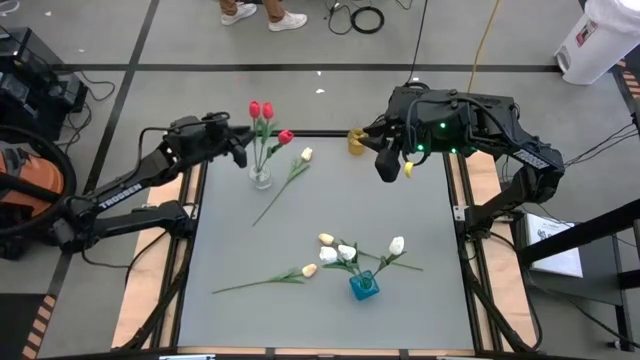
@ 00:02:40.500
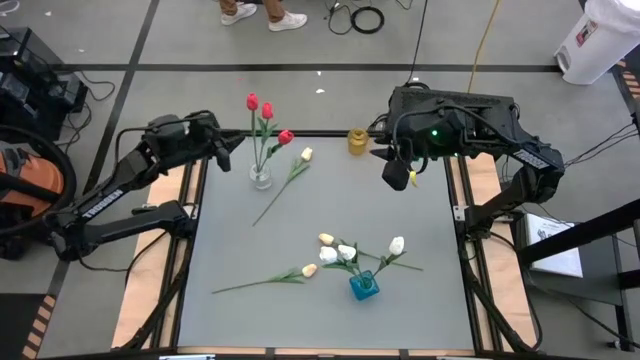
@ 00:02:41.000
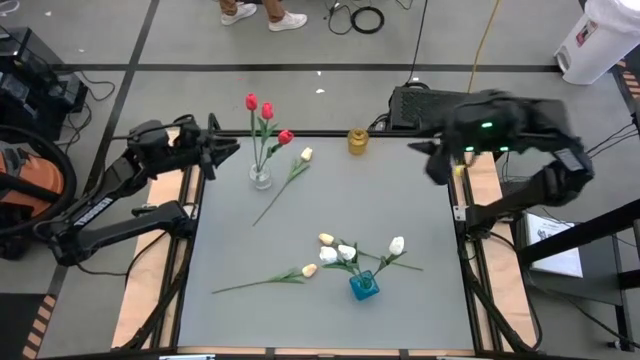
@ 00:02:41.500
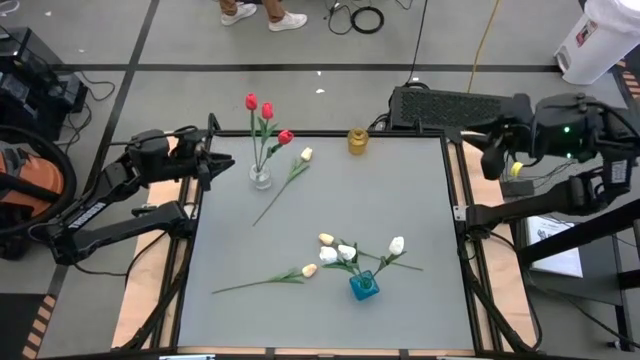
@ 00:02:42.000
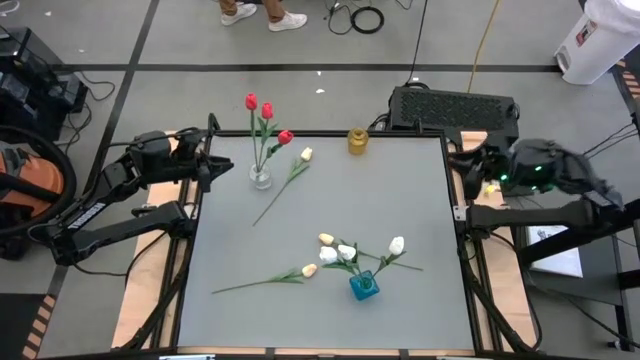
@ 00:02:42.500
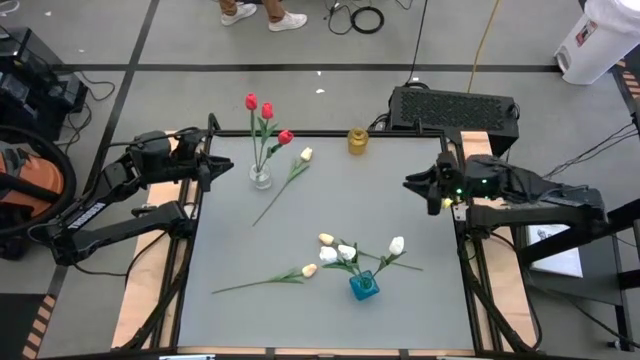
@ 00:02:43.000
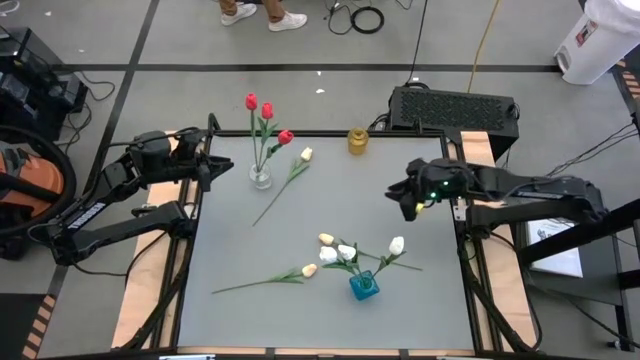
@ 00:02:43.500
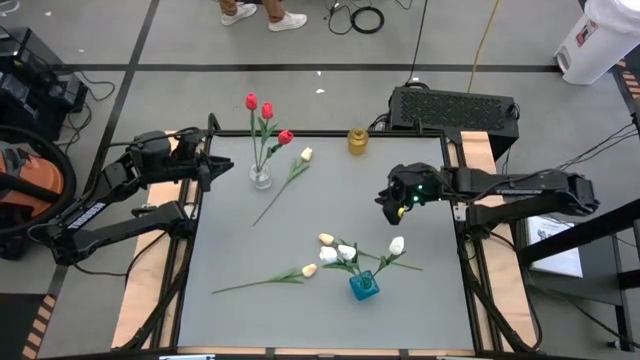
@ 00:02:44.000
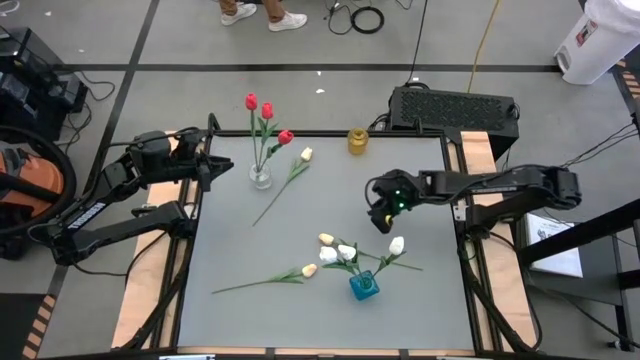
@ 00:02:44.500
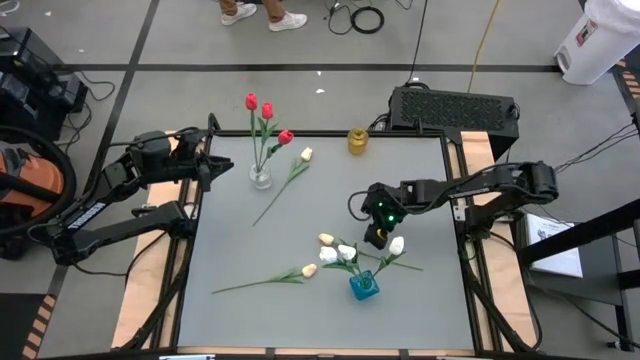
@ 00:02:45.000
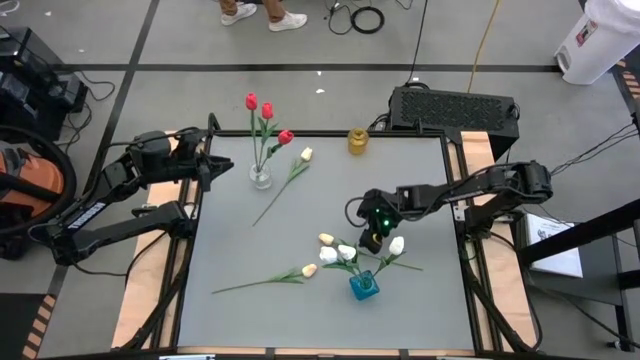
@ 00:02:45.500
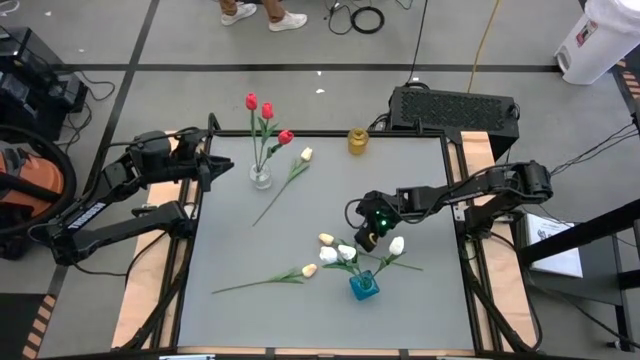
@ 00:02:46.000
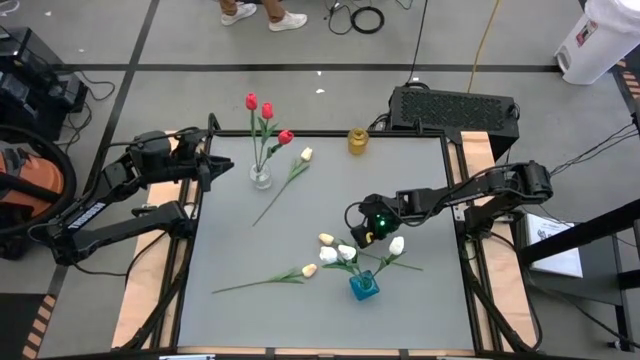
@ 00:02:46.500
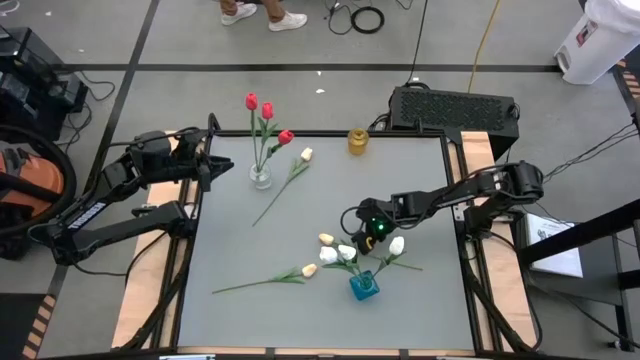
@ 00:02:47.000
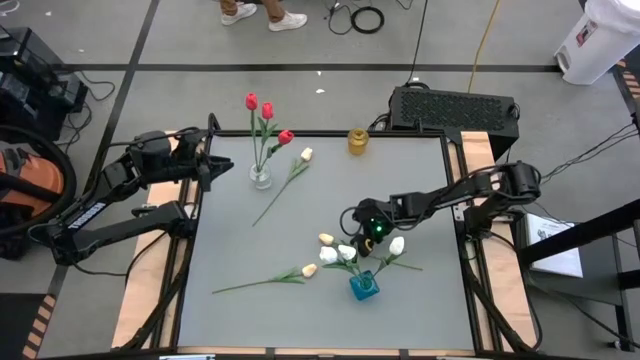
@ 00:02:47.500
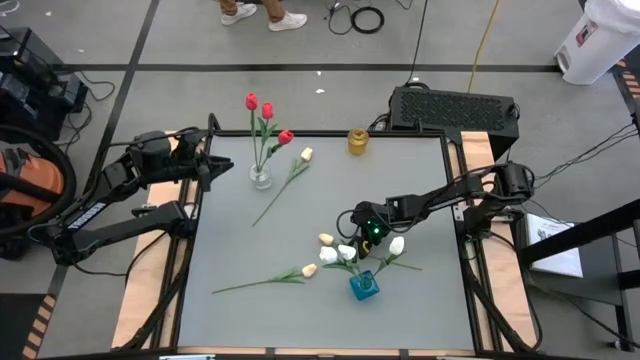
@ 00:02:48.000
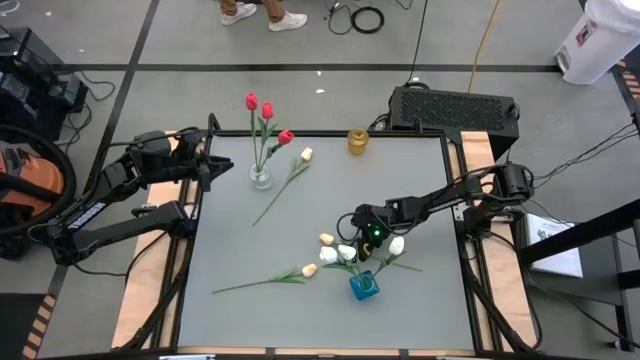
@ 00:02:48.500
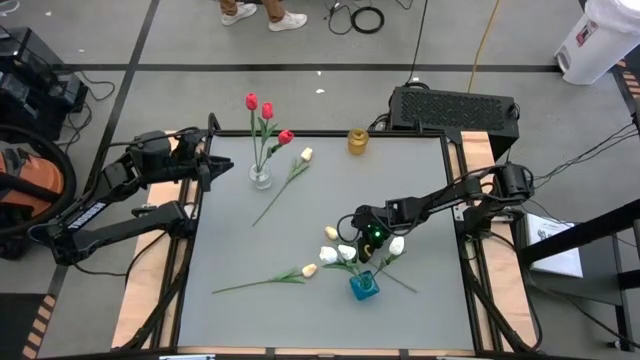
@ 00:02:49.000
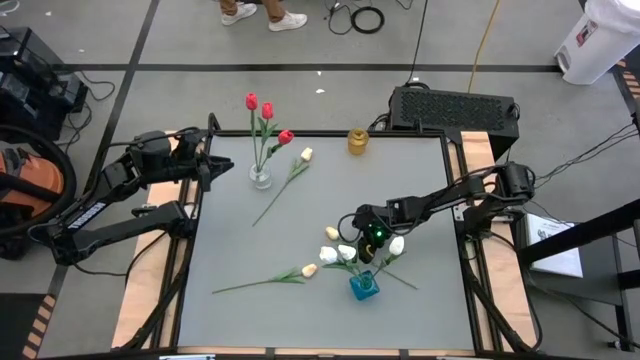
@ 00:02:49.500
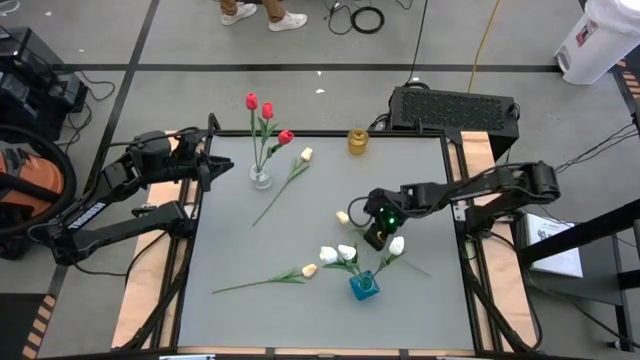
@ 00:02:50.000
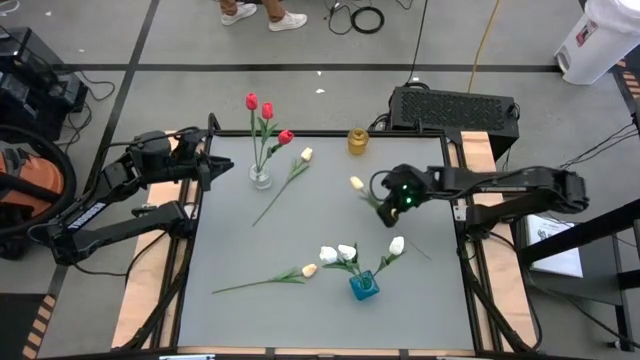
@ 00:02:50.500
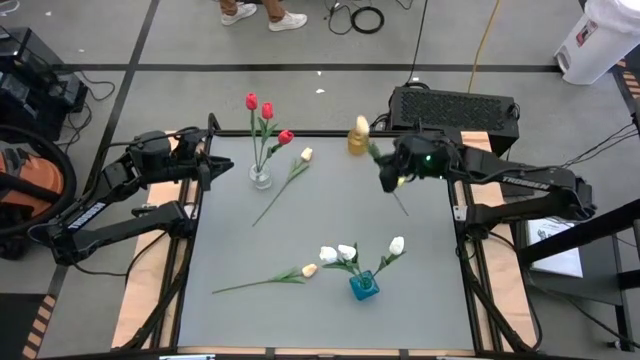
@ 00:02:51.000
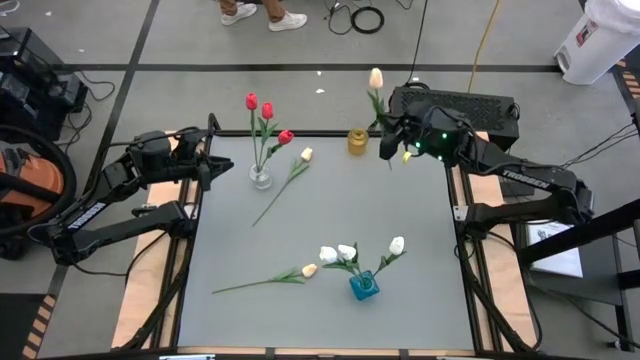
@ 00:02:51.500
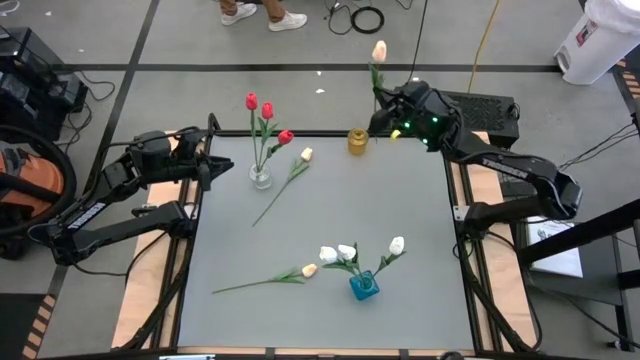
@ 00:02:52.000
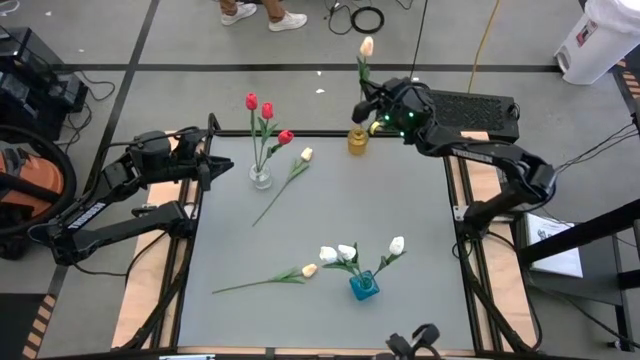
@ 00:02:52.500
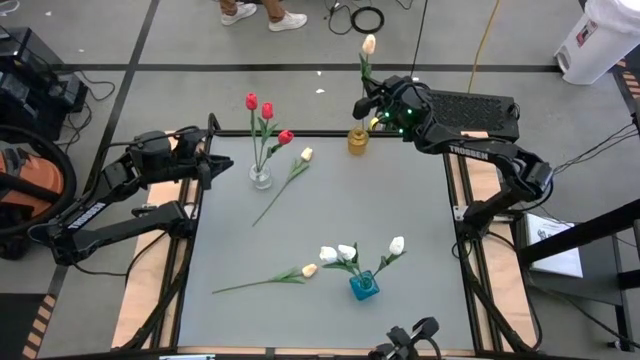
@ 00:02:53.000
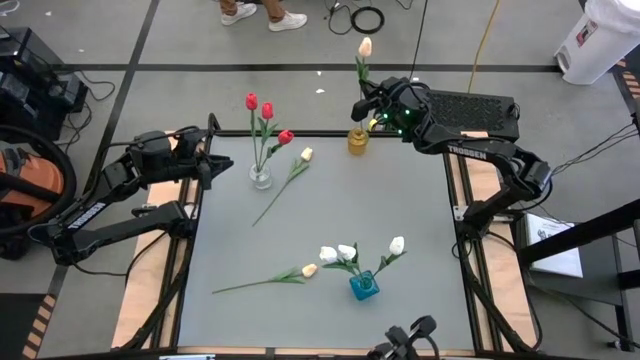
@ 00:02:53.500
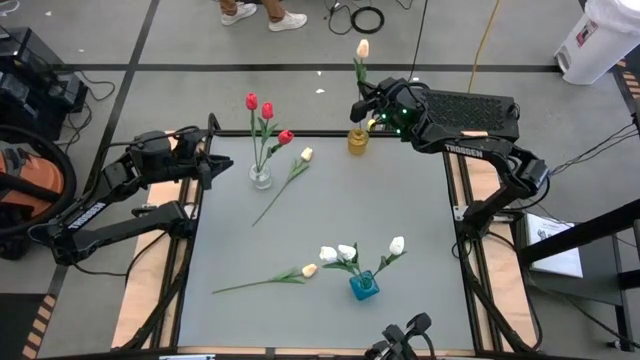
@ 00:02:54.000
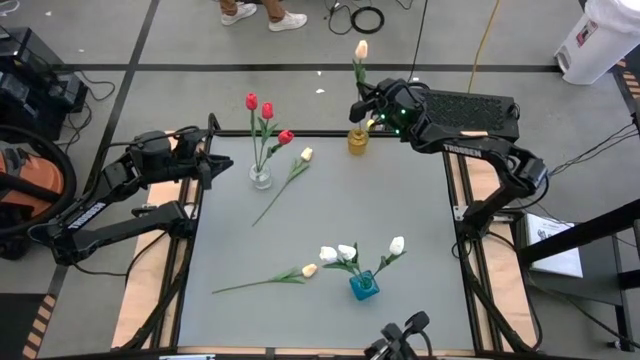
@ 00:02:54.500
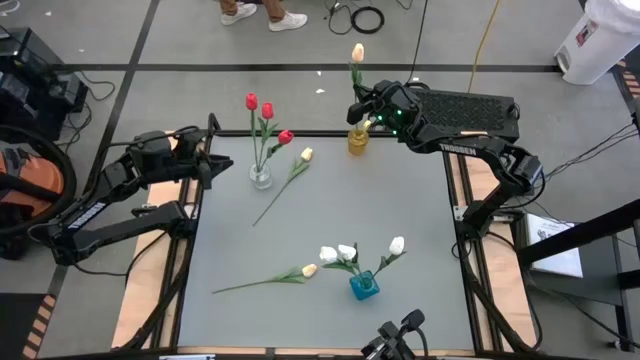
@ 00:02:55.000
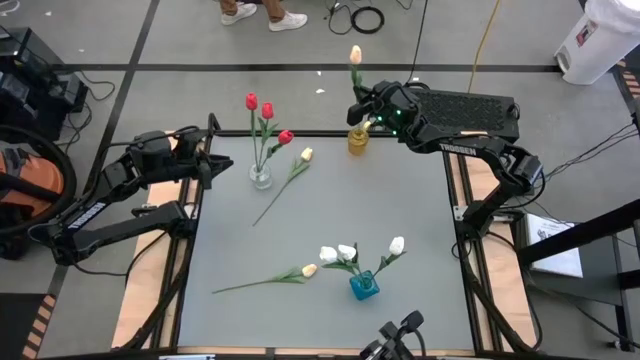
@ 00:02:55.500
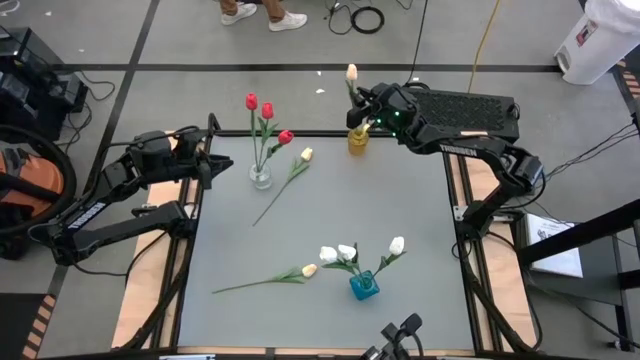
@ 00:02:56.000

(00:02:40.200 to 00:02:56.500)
Task: Sort flowers into vase by color
Put the center light yellow tulip into the yellow vase

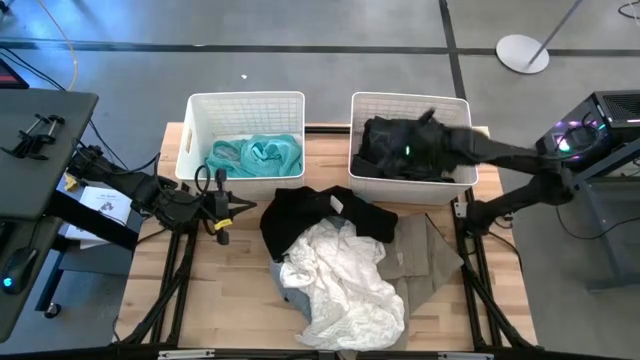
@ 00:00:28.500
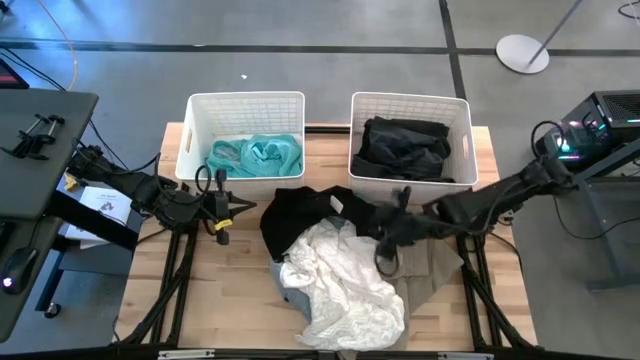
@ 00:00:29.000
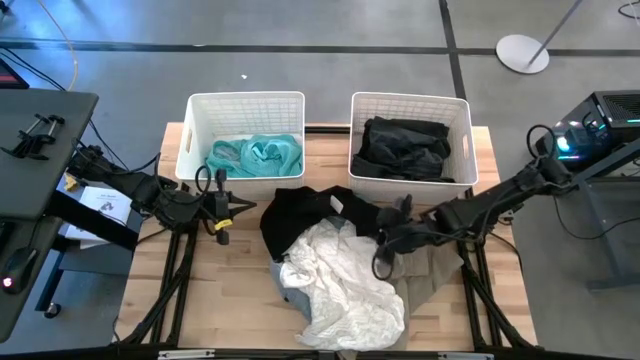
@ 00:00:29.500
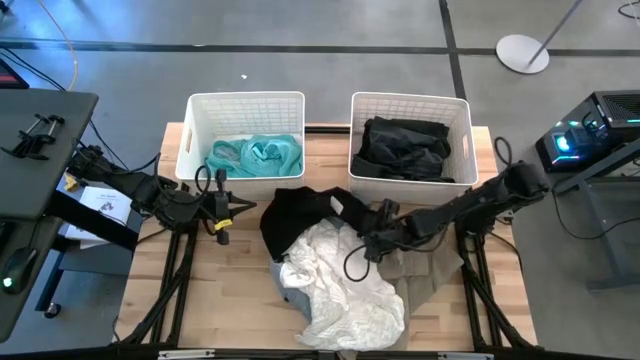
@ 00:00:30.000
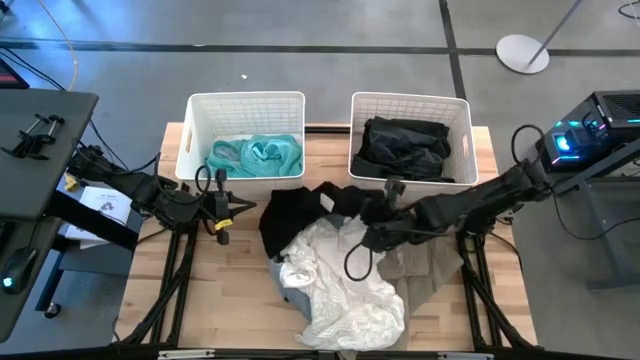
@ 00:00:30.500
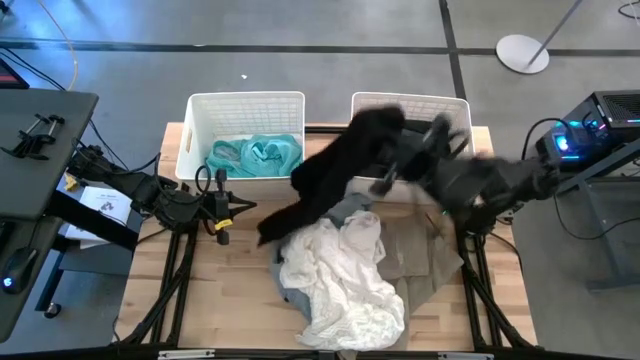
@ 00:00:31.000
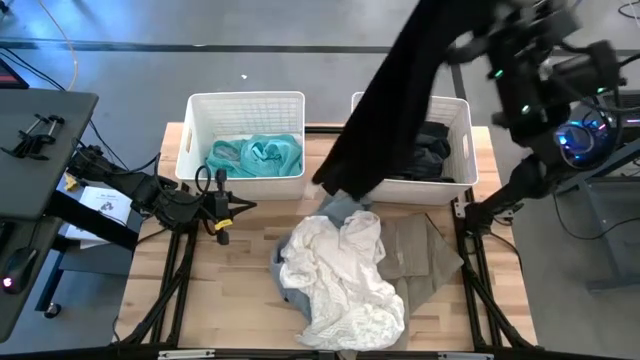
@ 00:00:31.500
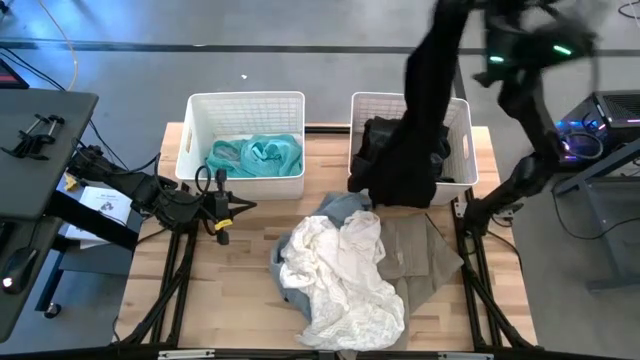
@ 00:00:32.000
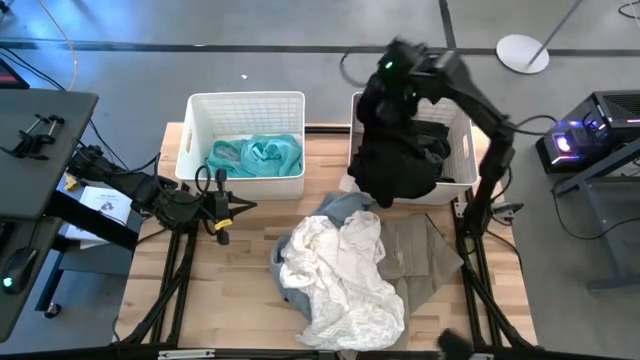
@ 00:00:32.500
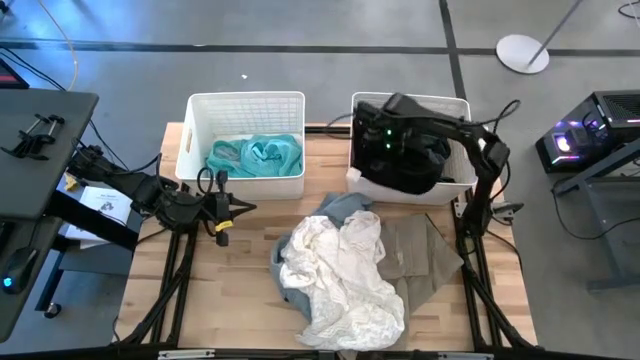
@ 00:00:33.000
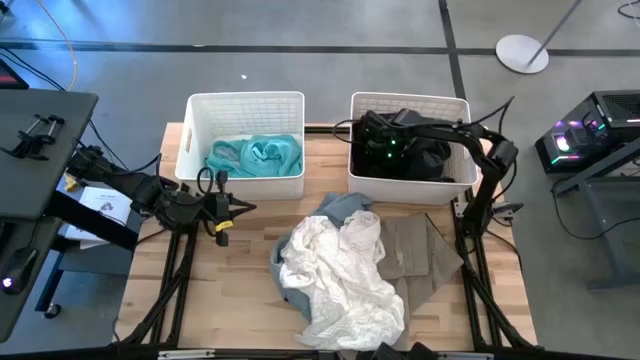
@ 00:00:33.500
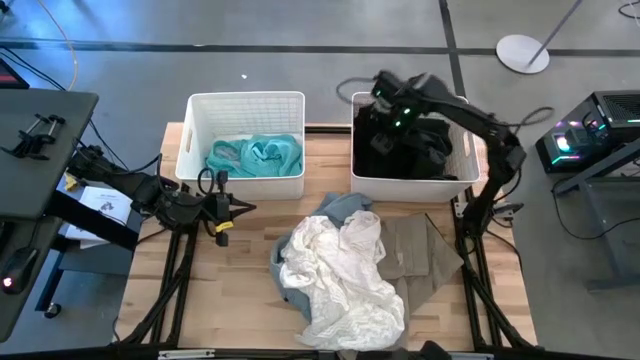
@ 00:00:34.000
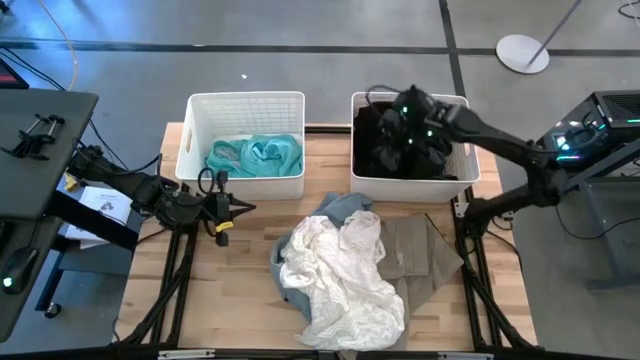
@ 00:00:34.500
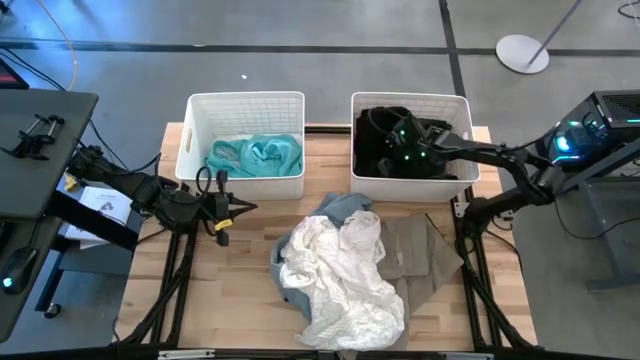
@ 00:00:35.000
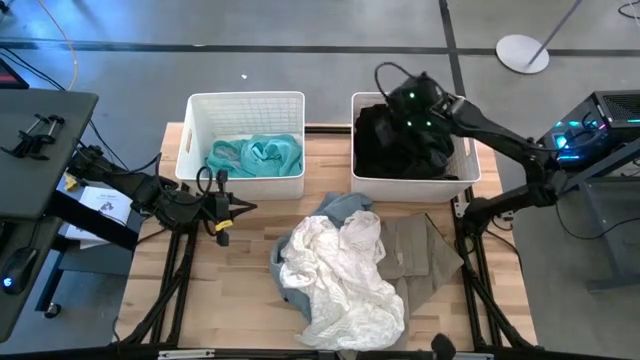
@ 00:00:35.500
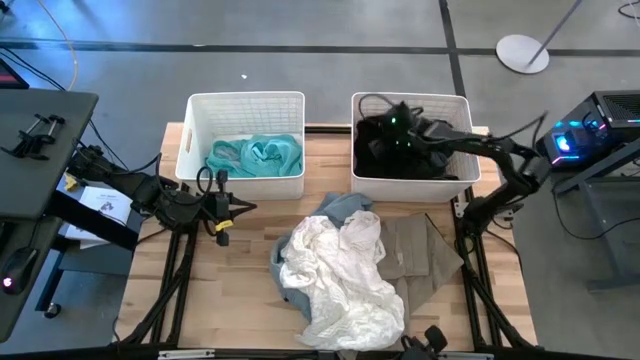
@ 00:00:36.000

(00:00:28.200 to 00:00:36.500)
Task: Sort clothes
Put the black pants into the right white laundry bin
